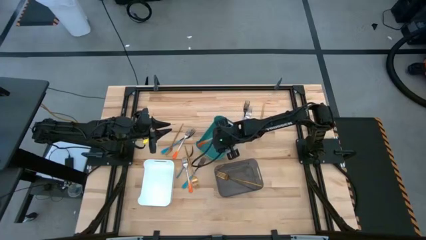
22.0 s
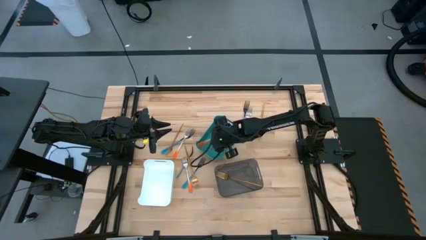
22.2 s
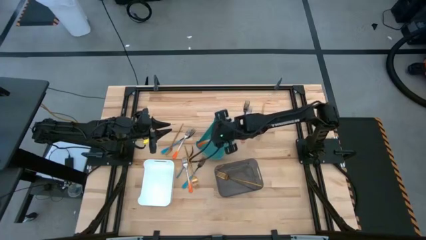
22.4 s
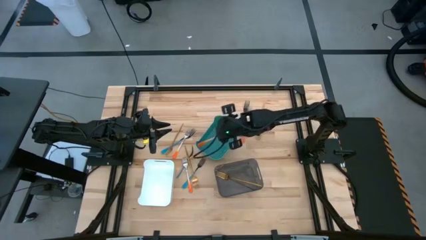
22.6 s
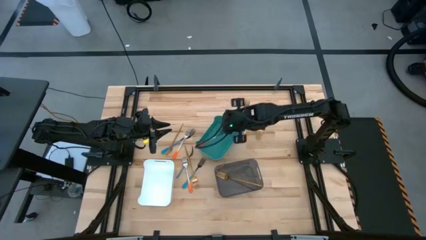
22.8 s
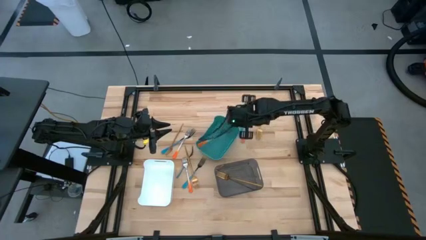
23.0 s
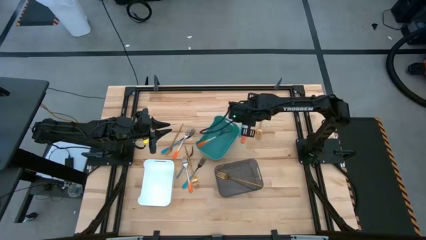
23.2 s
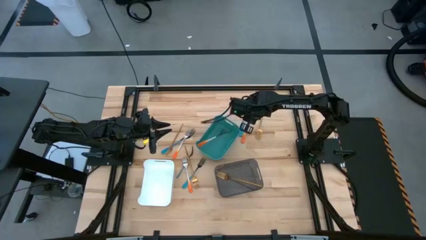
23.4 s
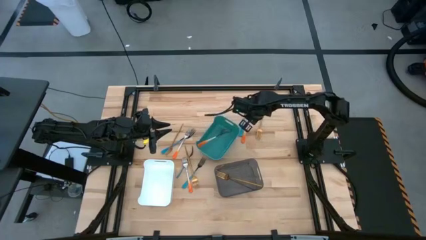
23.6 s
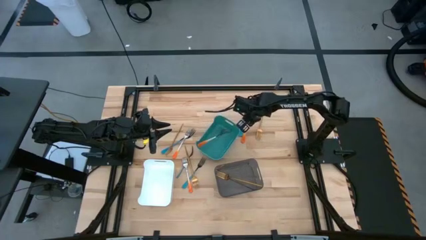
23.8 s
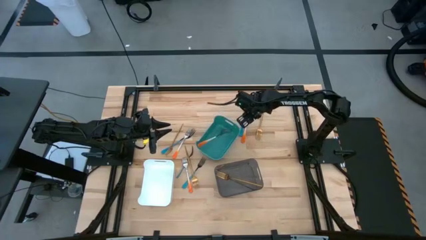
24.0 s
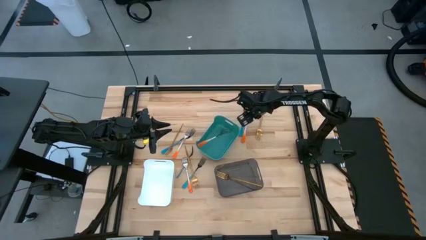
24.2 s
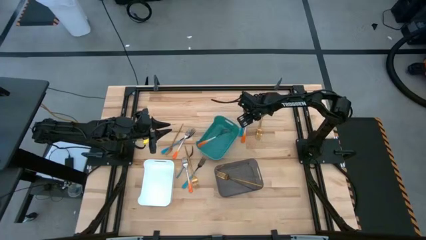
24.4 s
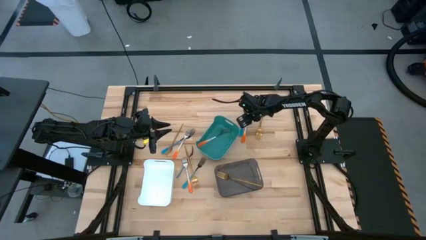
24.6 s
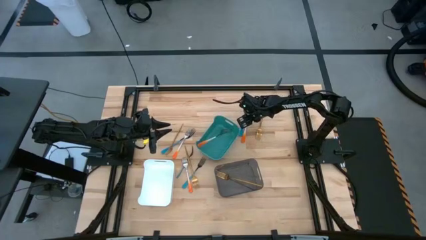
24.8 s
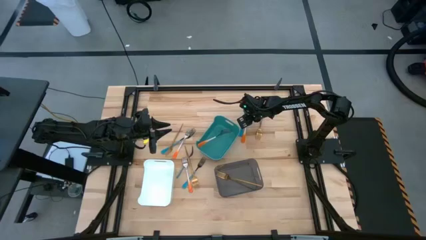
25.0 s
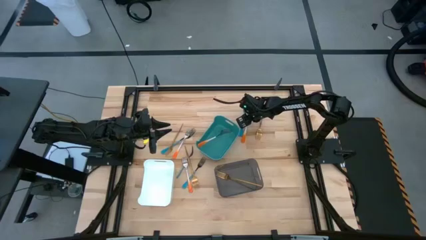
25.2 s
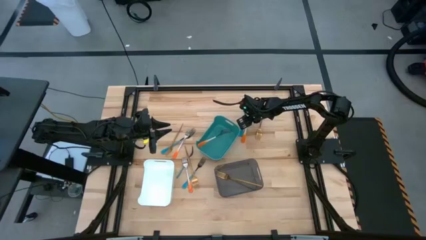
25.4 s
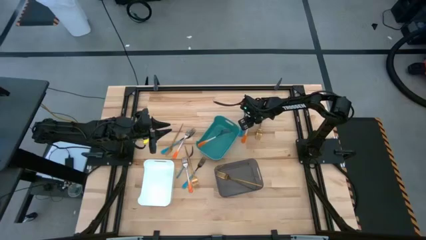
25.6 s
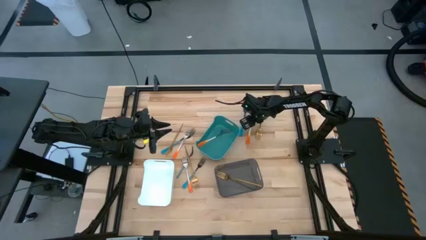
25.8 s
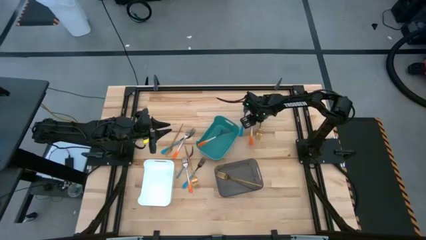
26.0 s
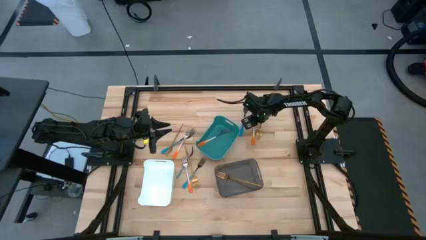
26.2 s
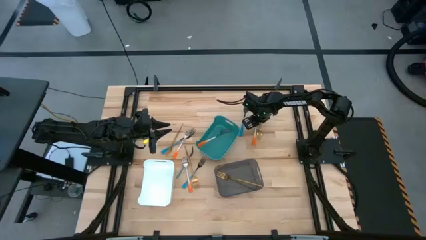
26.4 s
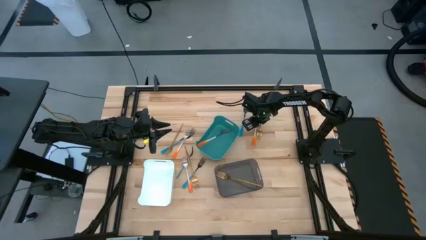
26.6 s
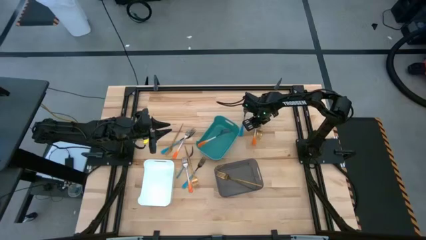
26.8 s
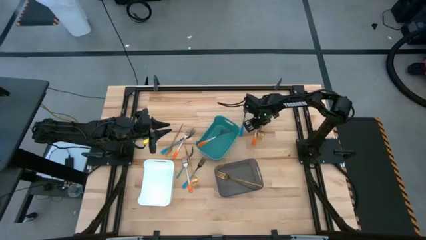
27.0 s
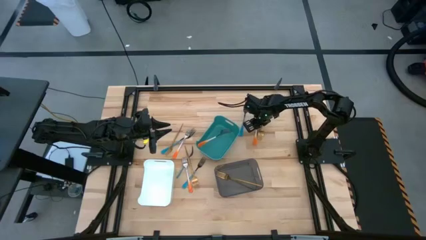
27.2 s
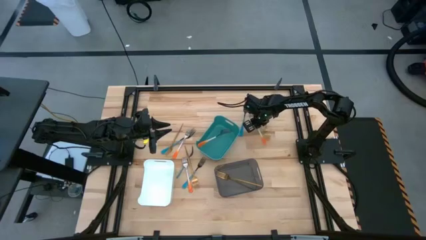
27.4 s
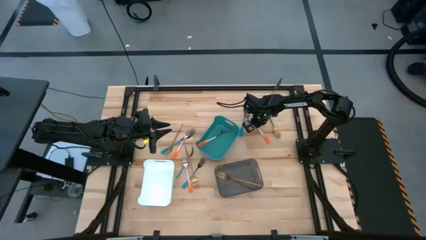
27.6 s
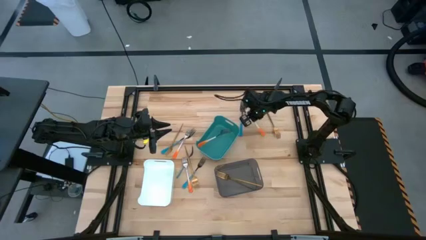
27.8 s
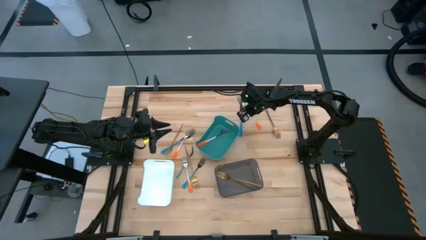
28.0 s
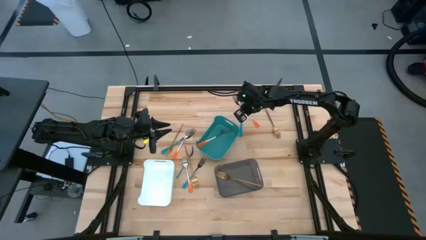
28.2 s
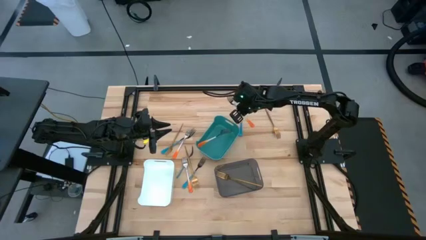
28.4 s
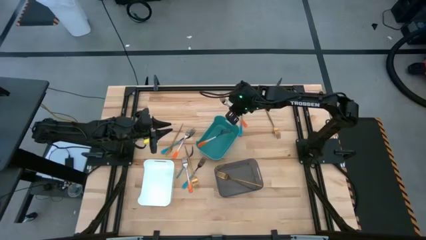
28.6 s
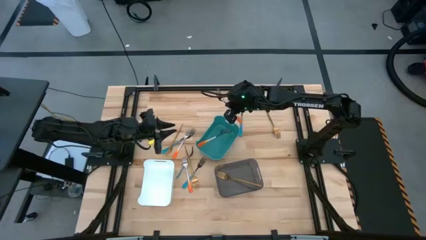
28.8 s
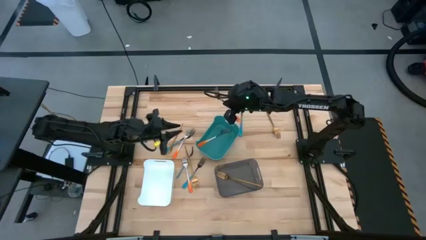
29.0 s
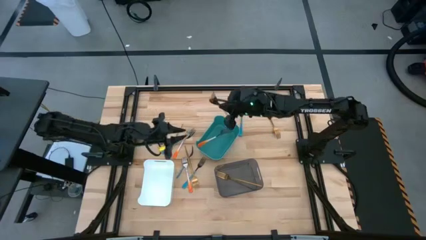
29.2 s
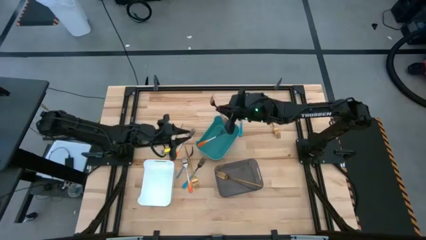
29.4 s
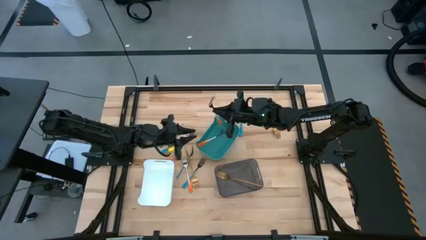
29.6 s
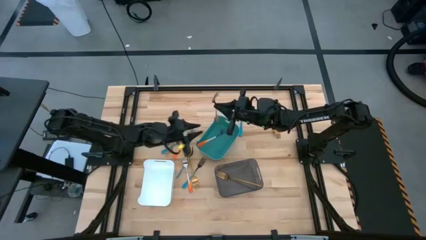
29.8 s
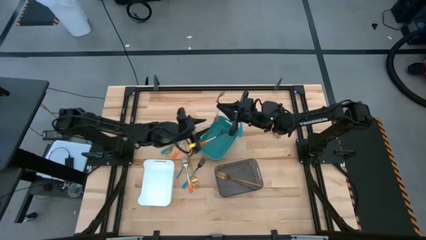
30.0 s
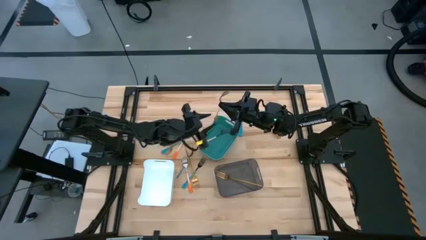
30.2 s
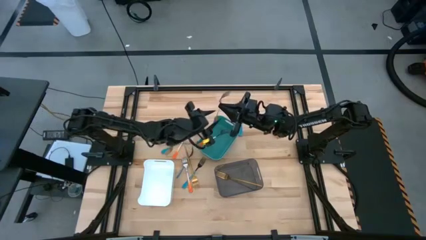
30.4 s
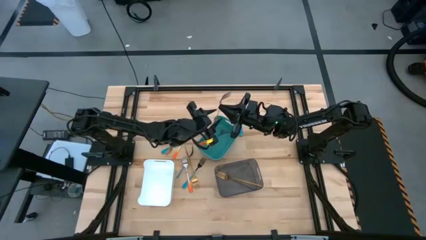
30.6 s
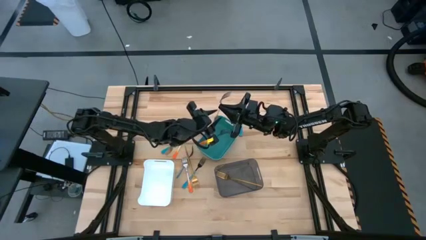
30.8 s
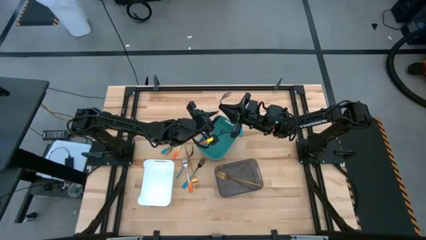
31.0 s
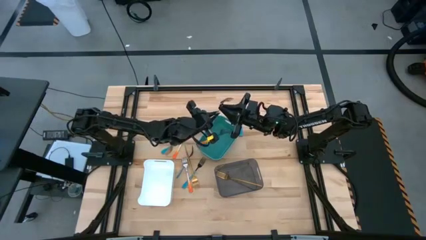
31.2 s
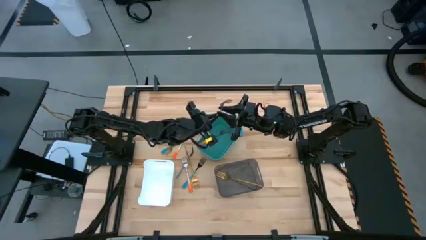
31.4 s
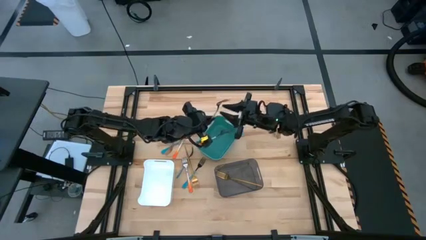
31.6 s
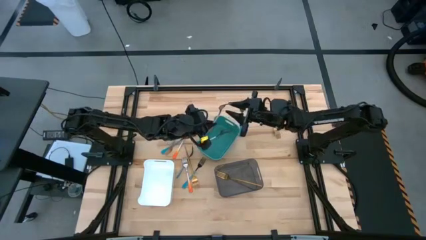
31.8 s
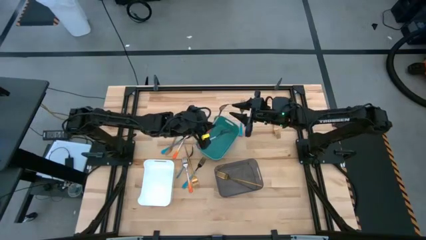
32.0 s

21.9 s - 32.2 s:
Task: Sort silverware by color (type)
Put the orange silver fork into the blue bin

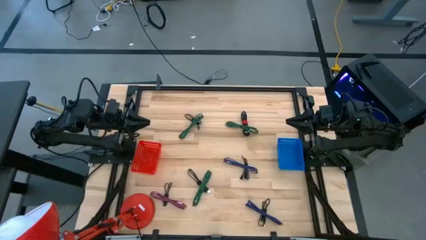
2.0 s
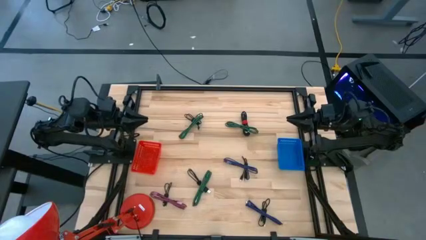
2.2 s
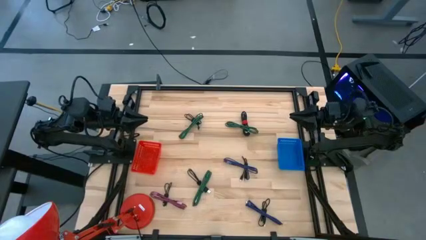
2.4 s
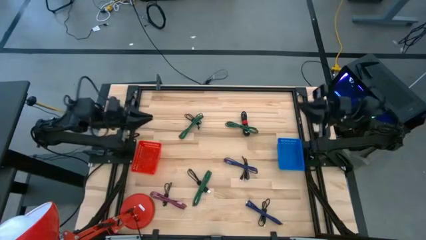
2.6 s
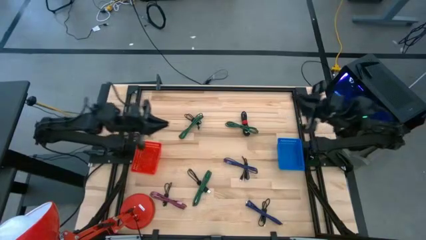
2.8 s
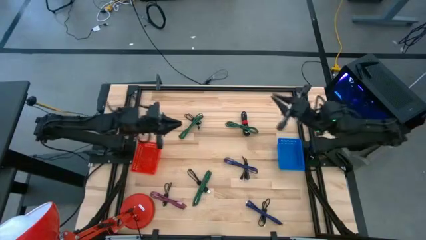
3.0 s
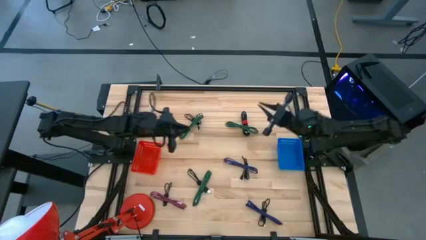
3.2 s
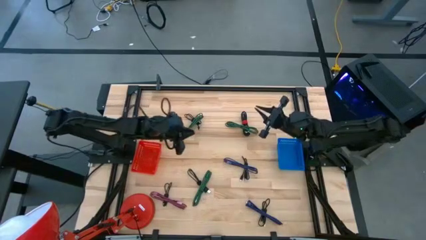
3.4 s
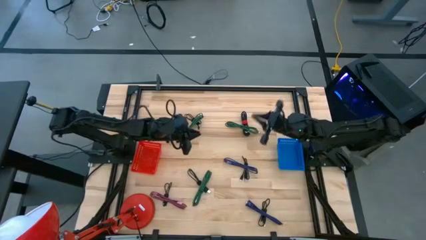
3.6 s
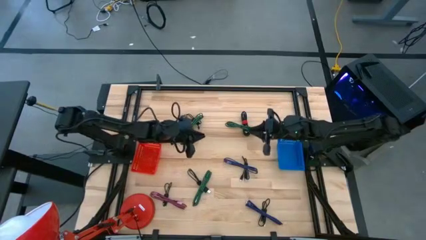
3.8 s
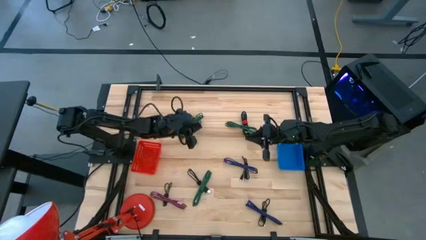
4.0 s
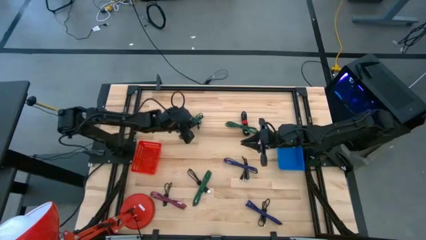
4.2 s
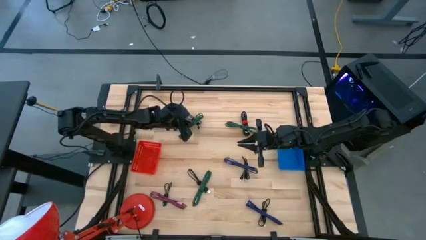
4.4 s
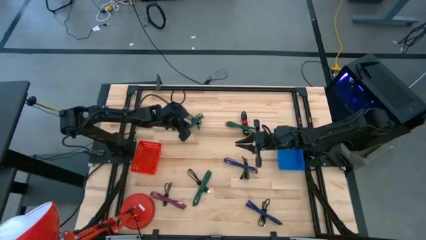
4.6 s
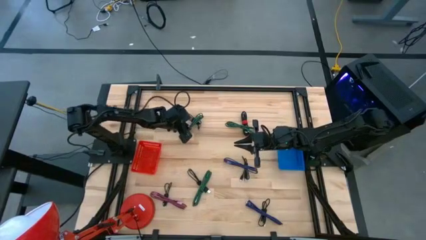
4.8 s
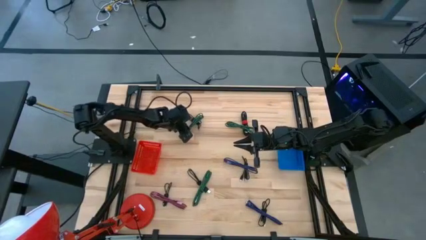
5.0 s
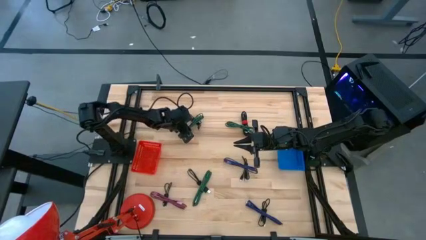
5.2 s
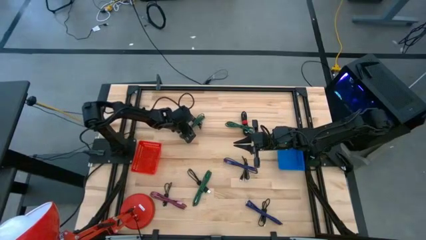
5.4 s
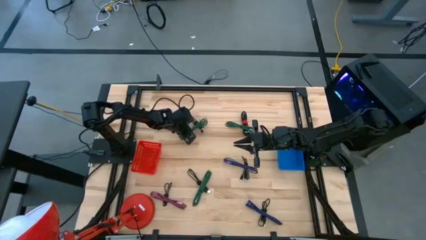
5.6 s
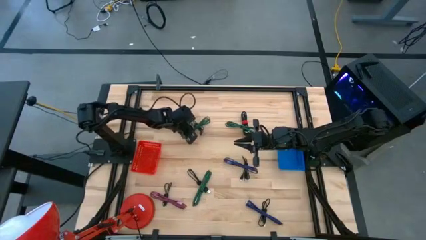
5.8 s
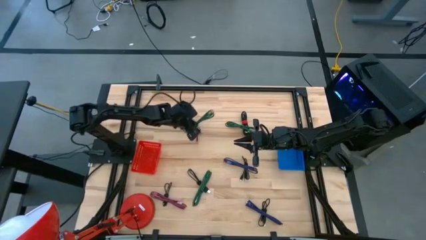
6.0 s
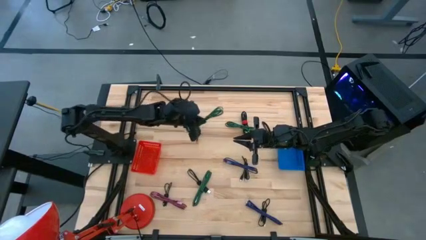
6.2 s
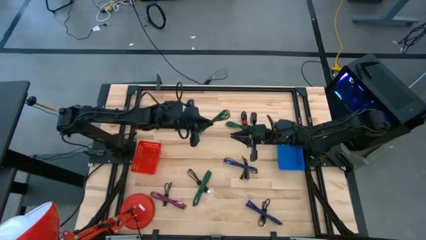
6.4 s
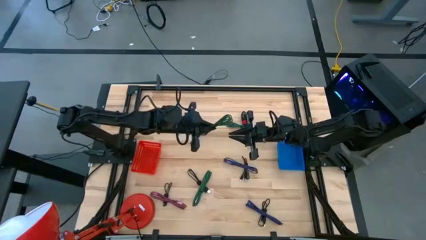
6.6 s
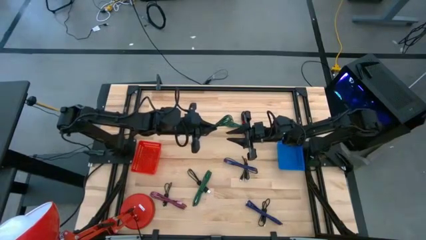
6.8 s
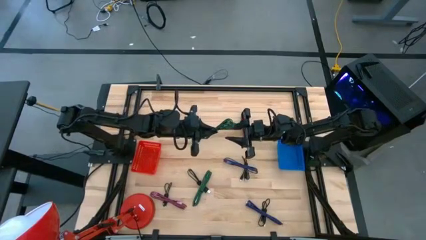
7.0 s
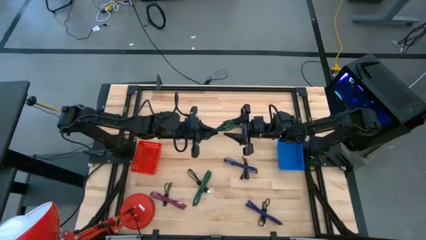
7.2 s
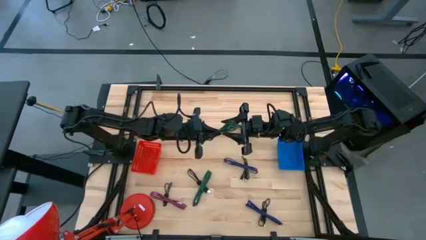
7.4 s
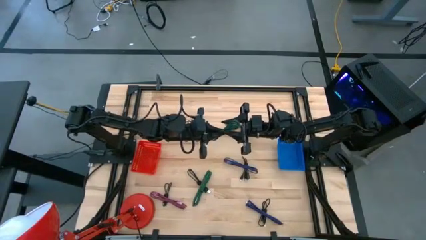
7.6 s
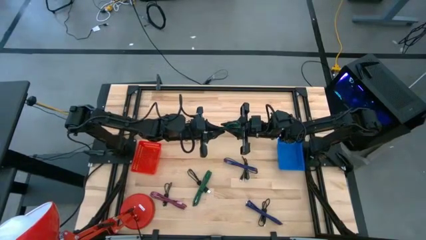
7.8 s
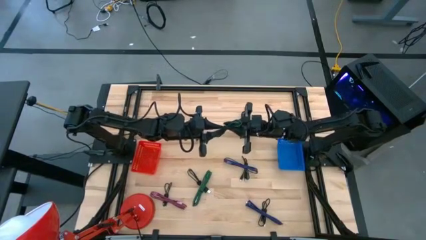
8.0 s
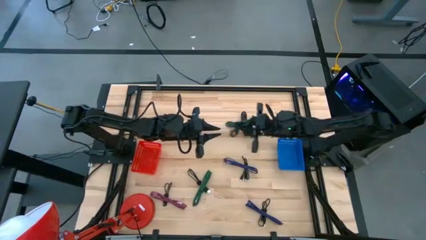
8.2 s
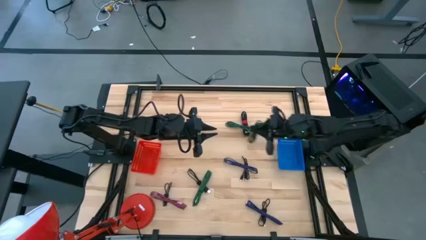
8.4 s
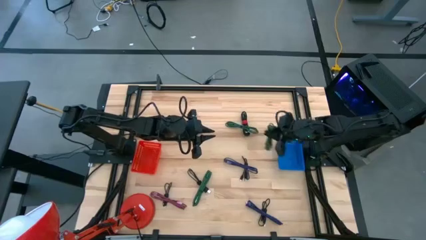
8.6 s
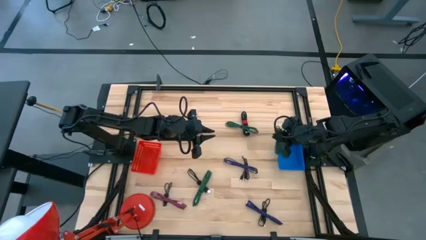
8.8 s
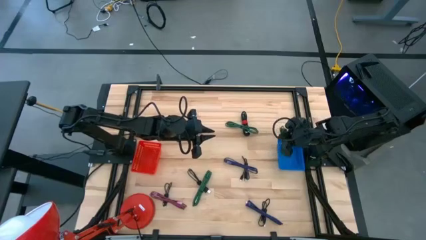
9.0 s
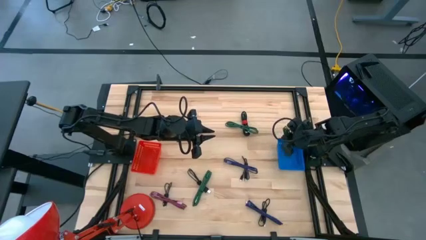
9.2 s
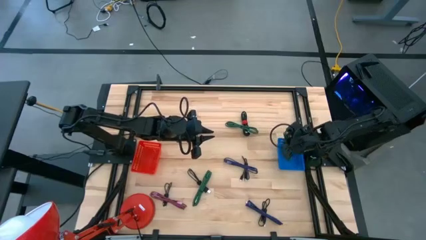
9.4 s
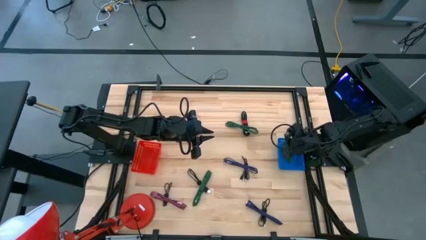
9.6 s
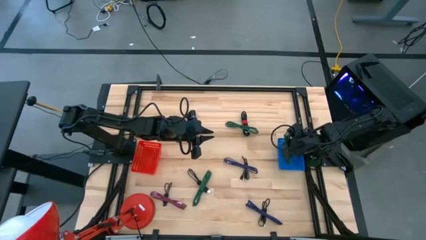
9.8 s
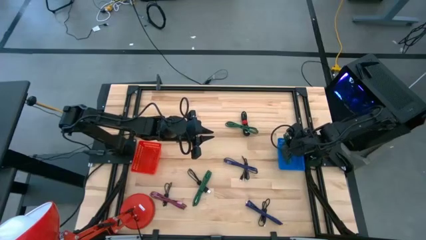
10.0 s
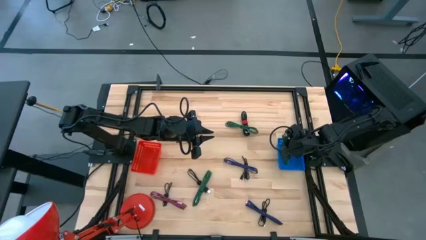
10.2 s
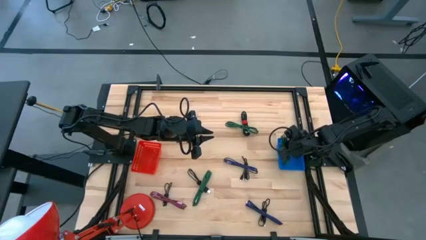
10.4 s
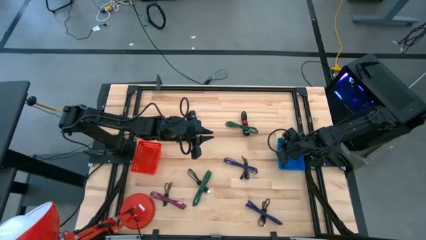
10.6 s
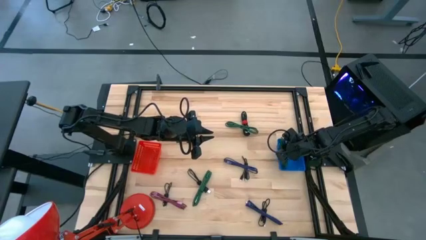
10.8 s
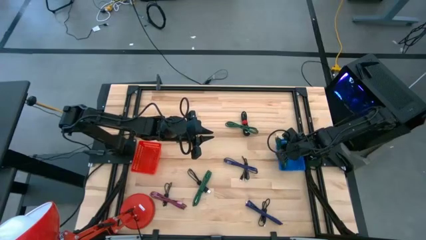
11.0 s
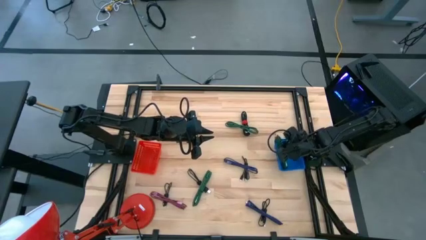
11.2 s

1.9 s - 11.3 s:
Task: Pick & Place USB Port
Put the top left green charger cable into the blue bin
